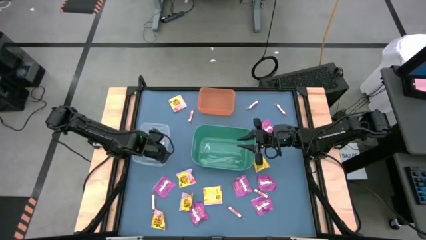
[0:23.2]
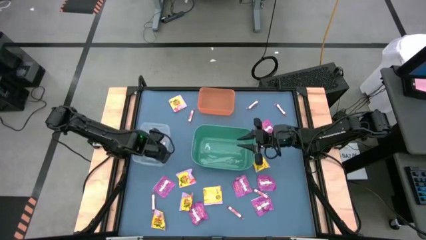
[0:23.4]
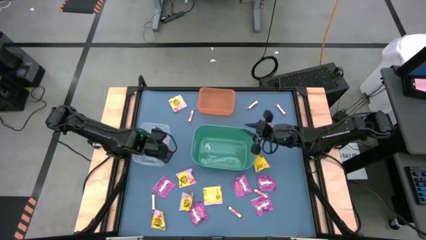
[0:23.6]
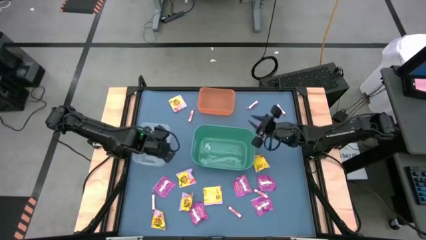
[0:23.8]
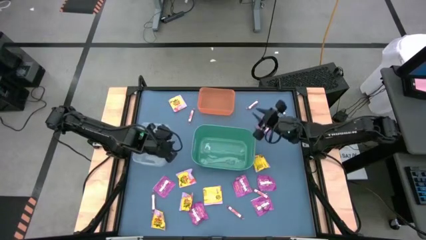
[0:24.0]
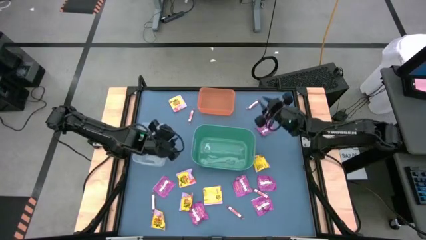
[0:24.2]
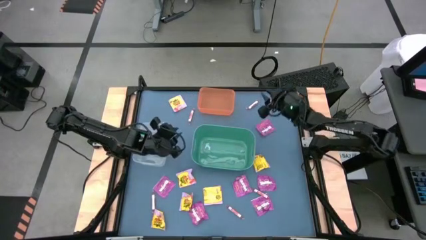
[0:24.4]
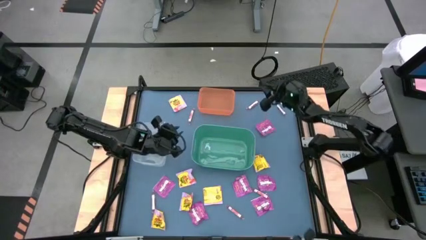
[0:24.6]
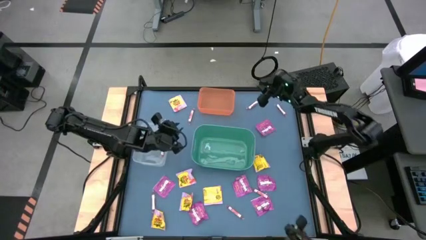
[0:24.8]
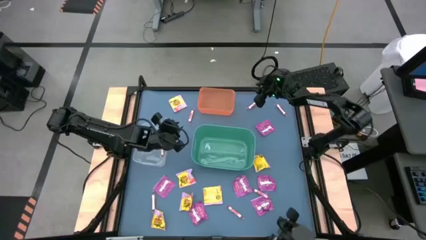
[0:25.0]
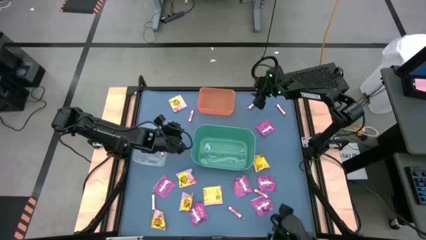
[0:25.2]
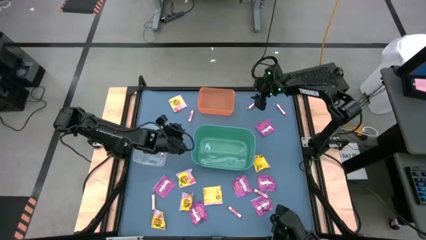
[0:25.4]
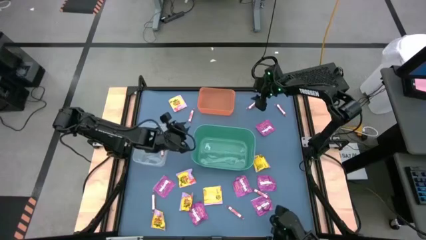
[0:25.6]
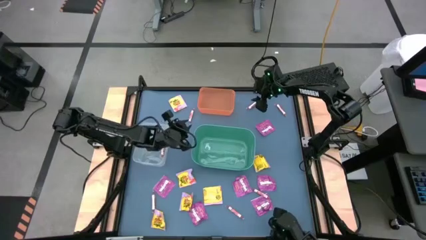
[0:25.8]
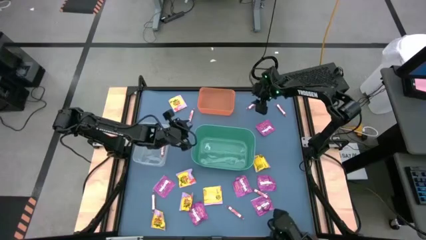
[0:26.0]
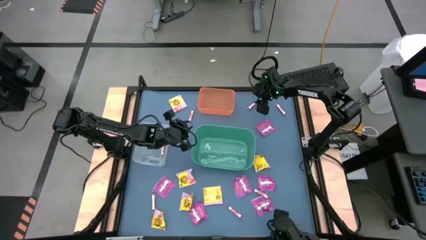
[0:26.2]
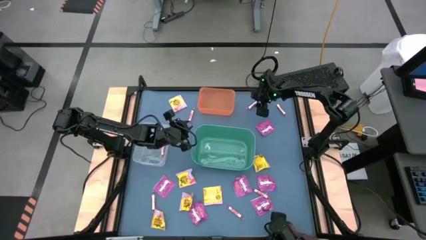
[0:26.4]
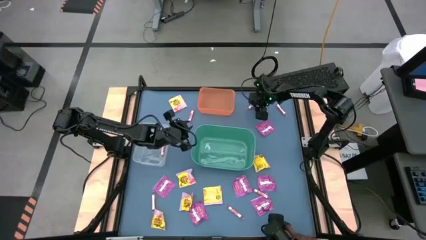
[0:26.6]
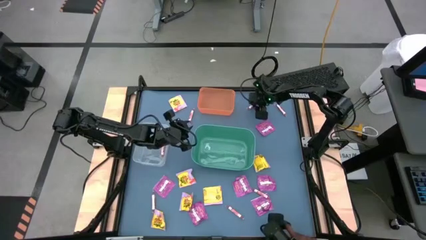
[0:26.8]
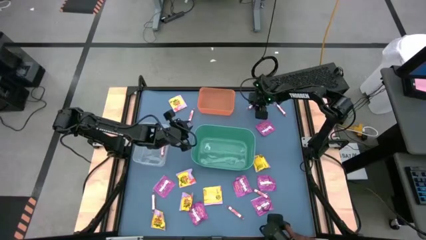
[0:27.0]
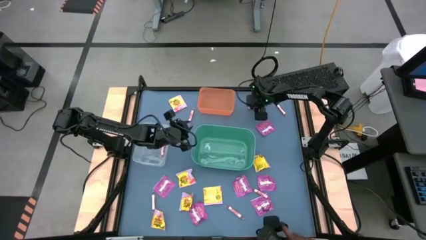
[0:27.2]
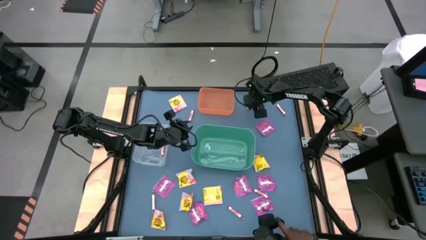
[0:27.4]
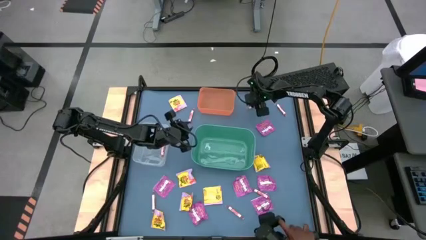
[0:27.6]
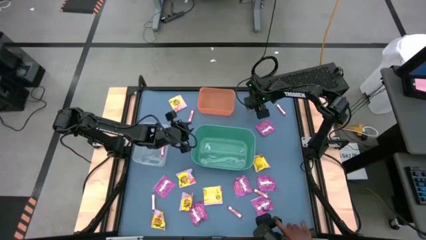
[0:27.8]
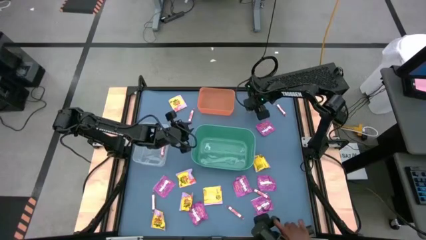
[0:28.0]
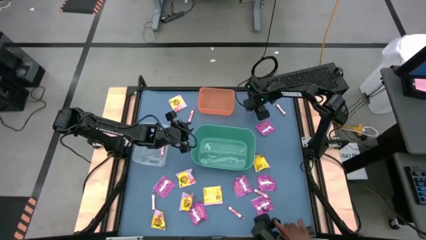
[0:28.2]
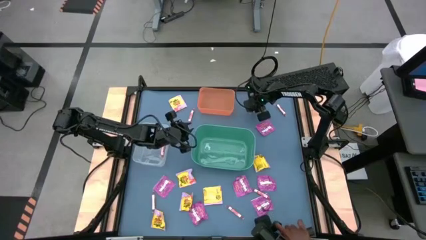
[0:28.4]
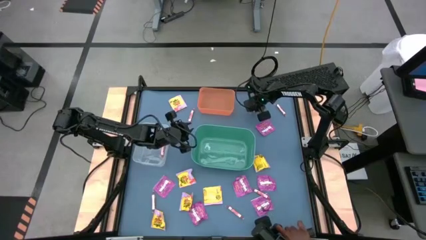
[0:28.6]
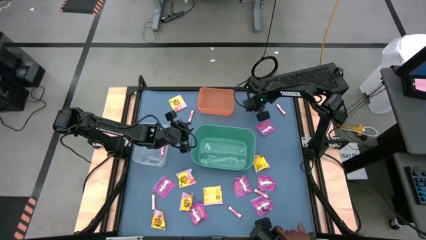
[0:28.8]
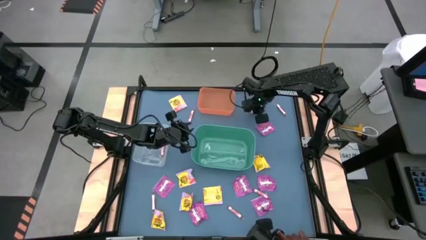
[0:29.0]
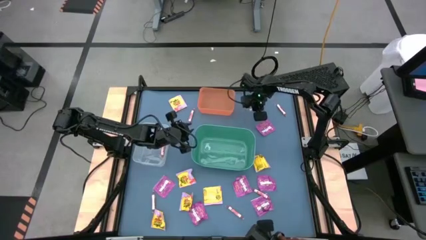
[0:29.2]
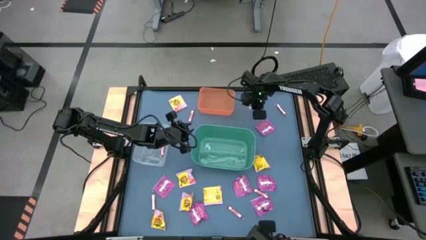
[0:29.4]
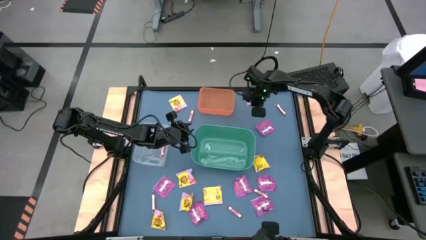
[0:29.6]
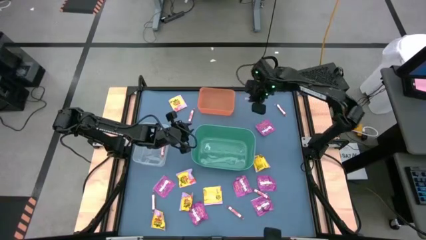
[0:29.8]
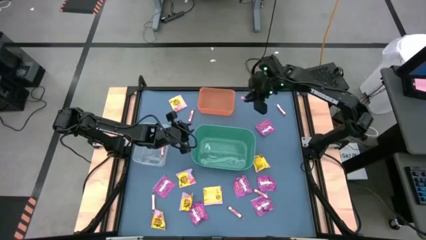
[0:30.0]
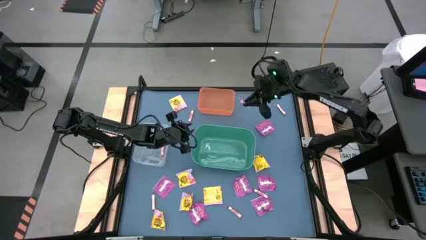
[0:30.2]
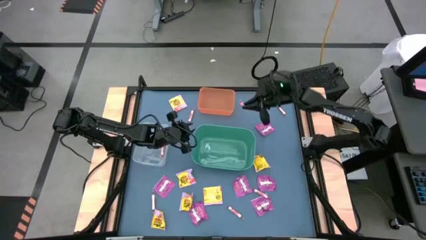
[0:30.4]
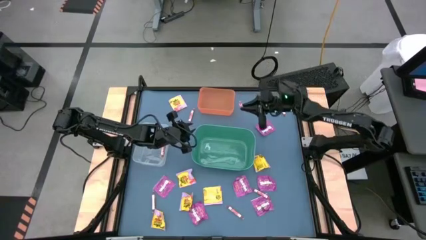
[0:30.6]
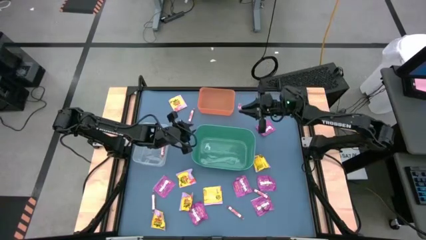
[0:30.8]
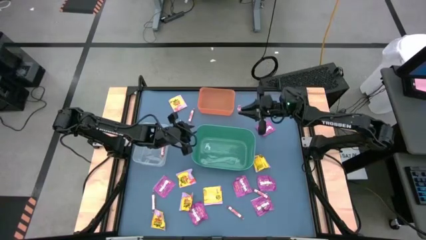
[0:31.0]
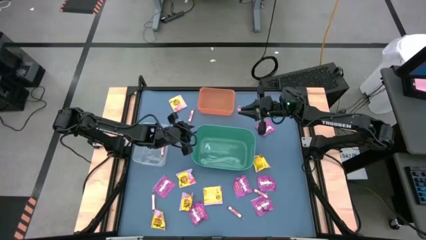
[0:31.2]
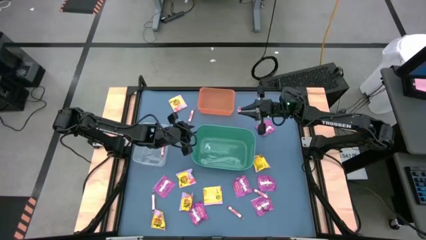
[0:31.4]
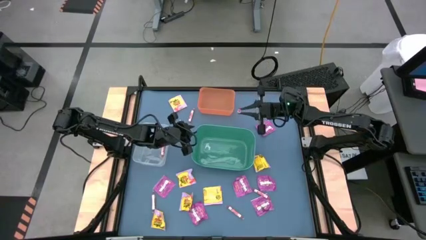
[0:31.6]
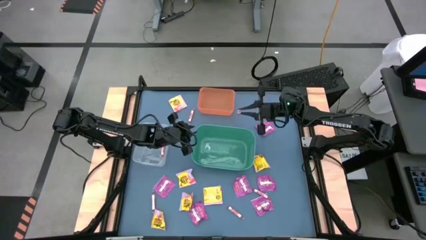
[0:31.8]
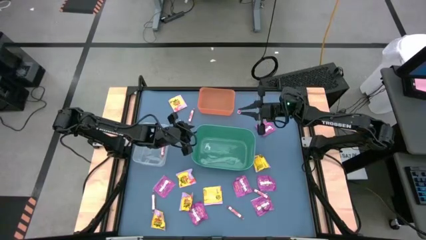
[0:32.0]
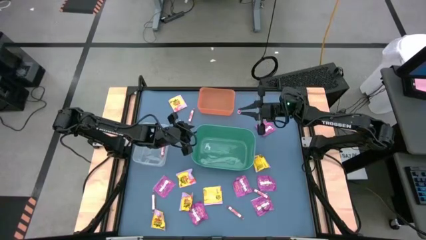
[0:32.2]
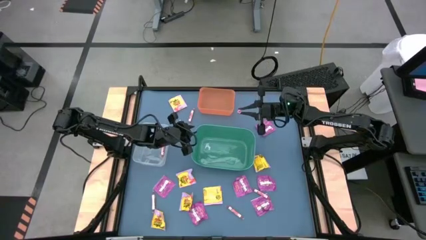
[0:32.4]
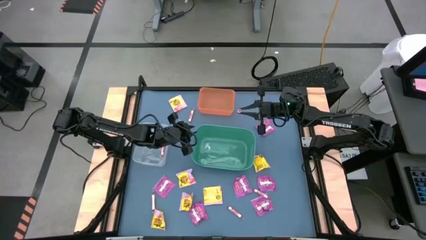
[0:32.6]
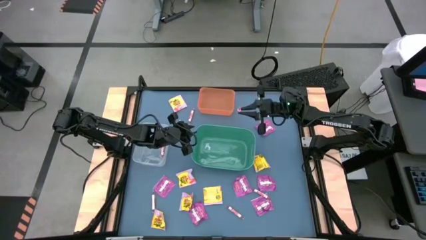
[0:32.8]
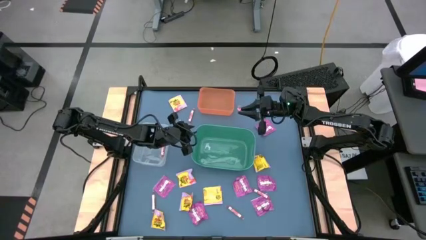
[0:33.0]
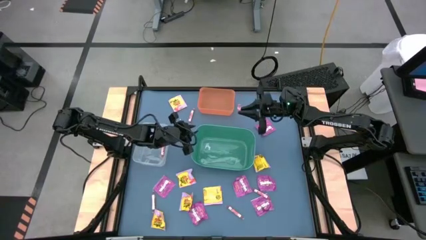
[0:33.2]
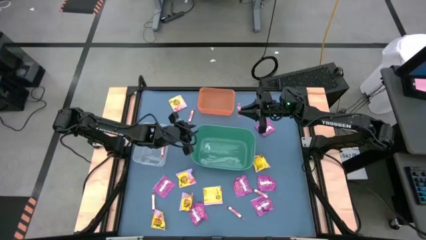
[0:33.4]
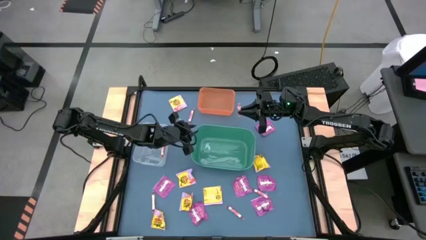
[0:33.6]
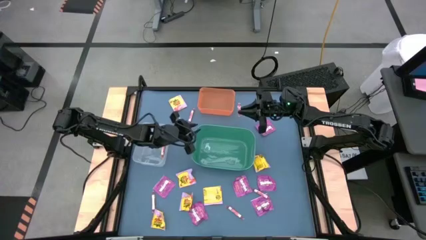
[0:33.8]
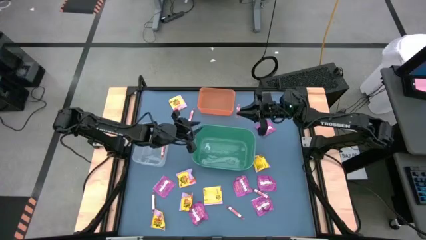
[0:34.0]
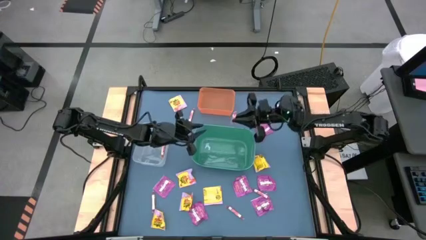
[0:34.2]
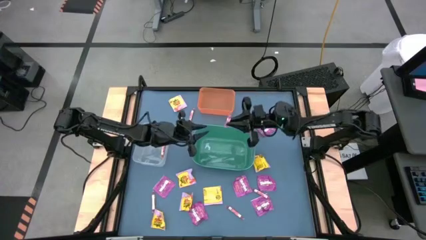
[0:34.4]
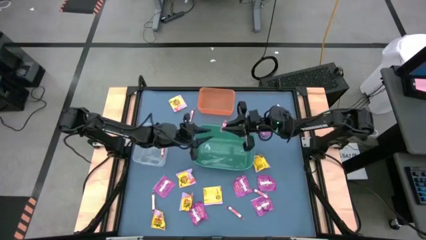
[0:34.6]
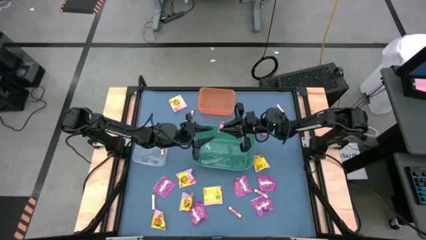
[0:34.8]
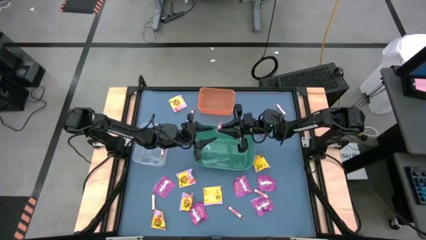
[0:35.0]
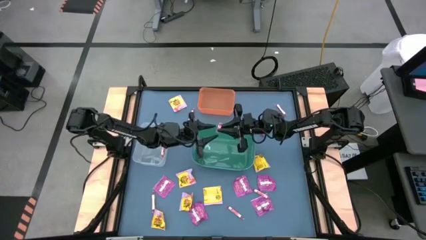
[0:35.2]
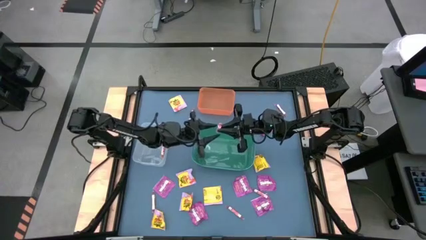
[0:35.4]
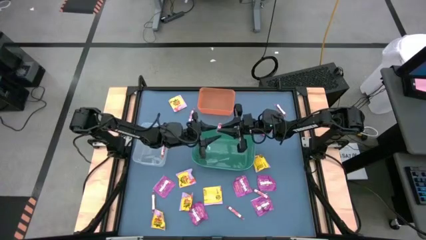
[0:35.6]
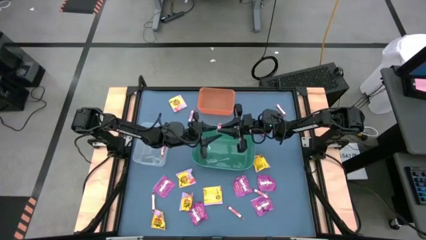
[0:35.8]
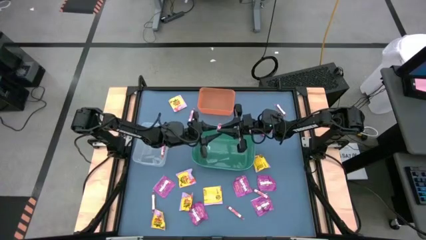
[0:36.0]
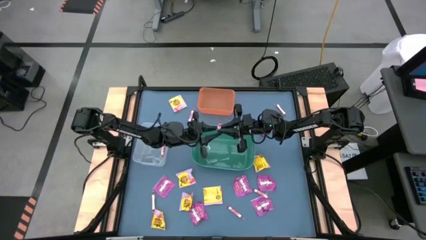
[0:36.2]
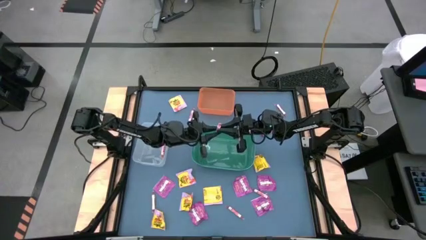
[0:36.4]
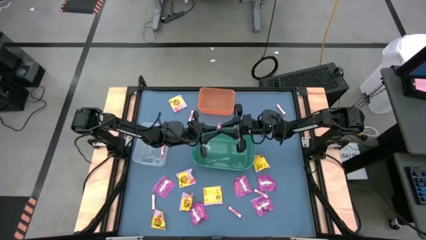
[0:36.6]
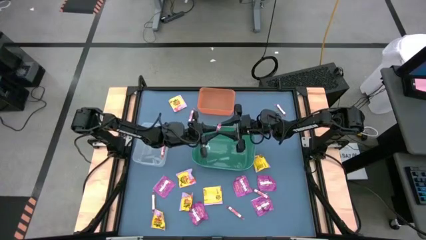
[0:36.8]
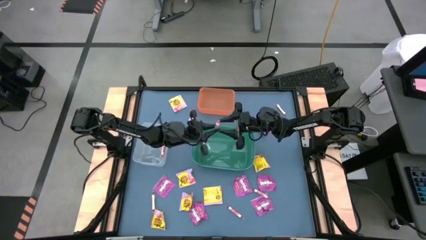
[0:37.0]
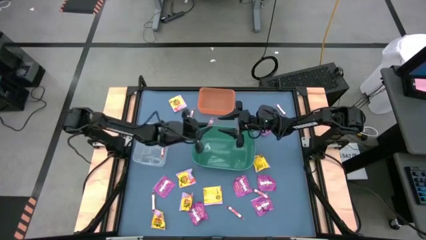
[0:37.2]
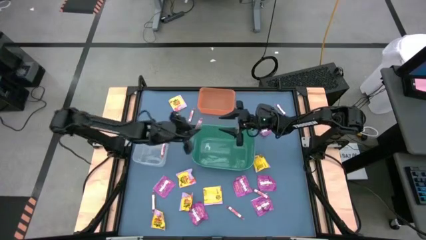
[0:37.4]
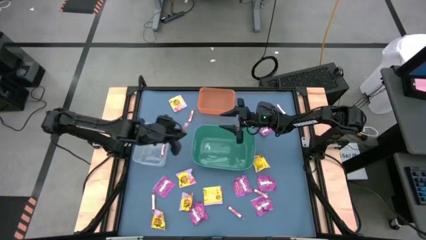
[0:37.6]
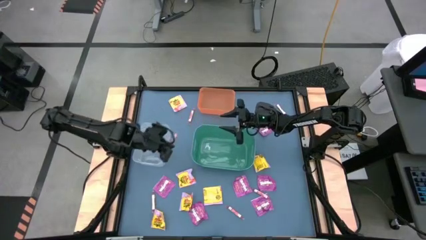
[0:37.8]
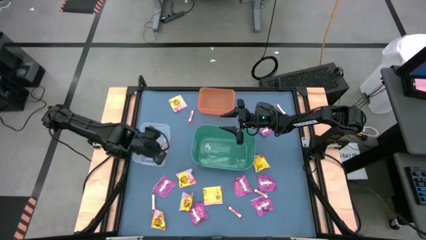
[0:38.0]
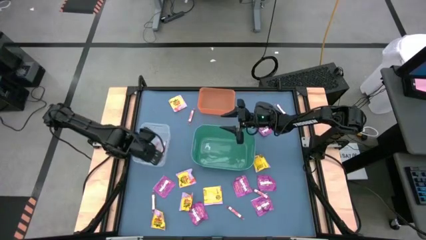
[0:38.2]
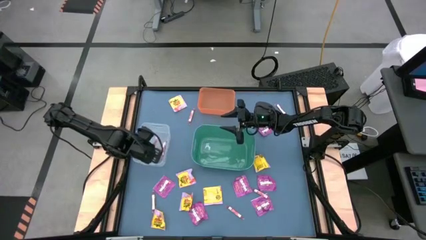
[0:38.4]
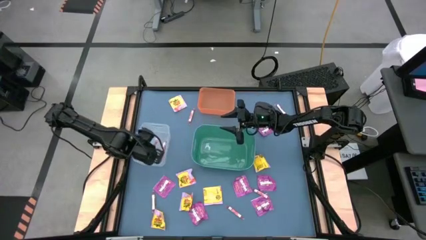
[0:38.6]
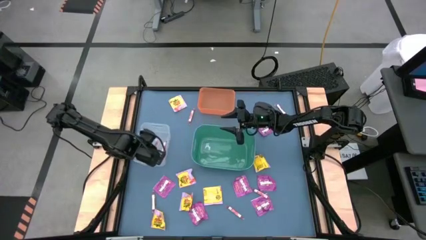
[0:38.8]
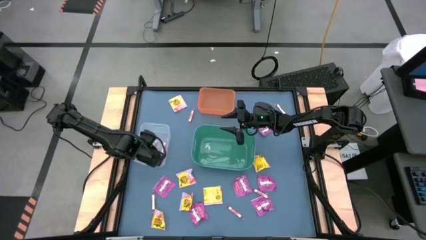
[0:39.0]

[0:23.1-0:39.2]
Task: Sort candy
Put the orange candy into the transparent bin
